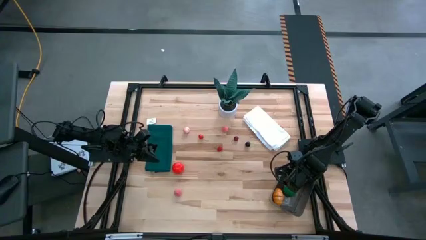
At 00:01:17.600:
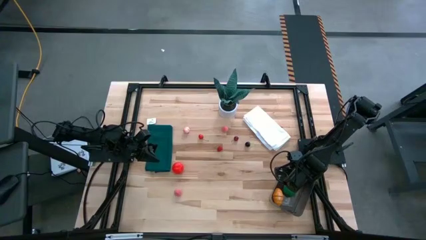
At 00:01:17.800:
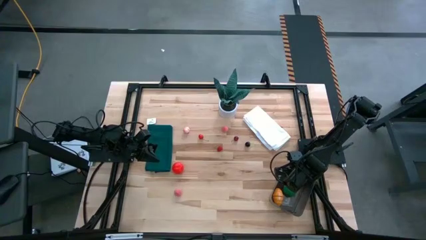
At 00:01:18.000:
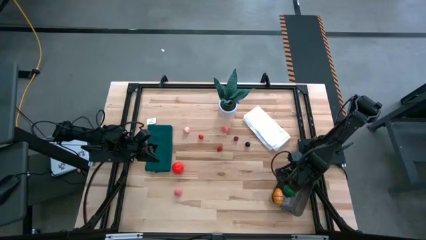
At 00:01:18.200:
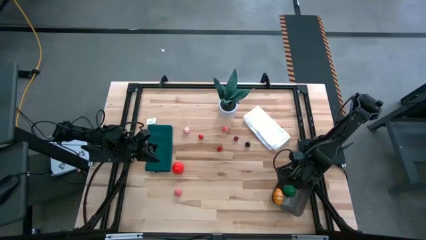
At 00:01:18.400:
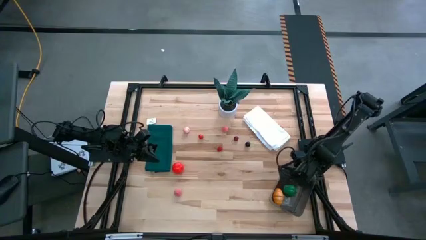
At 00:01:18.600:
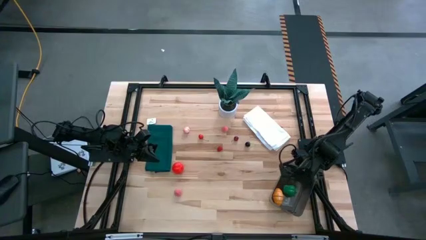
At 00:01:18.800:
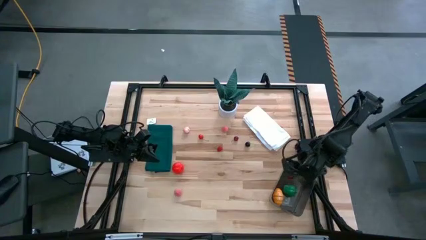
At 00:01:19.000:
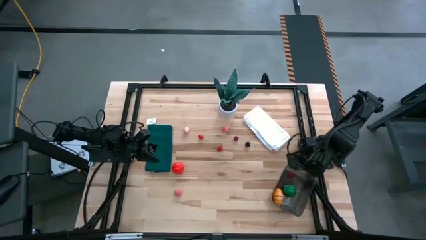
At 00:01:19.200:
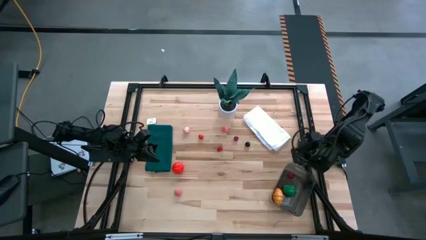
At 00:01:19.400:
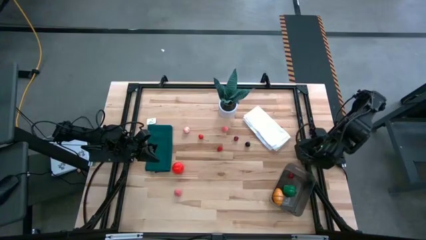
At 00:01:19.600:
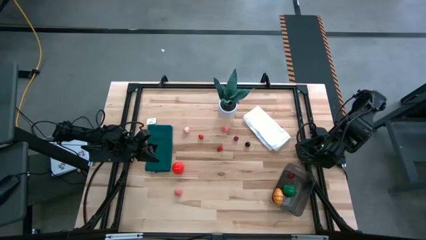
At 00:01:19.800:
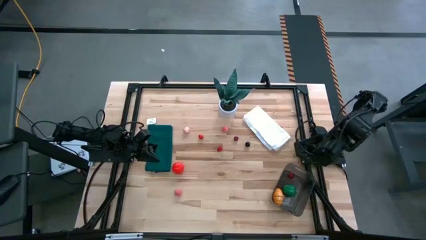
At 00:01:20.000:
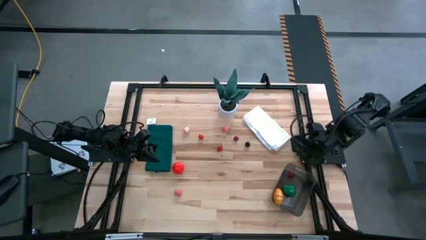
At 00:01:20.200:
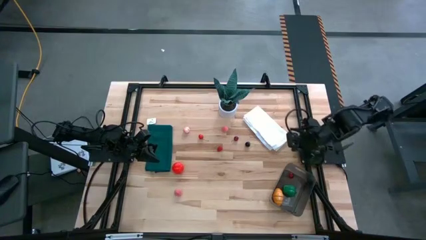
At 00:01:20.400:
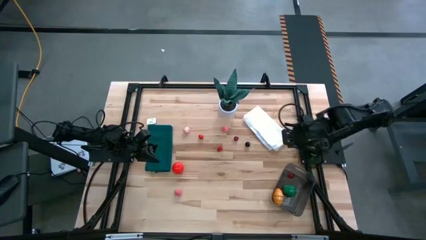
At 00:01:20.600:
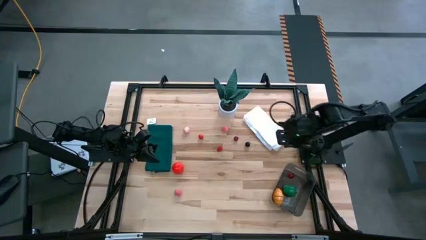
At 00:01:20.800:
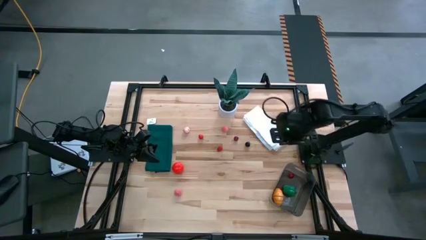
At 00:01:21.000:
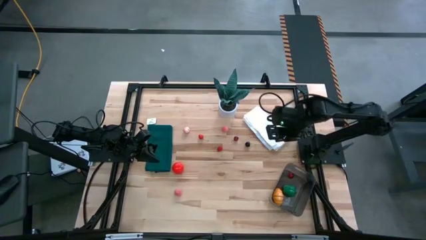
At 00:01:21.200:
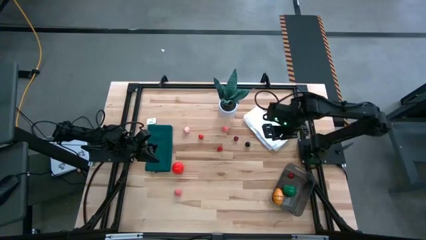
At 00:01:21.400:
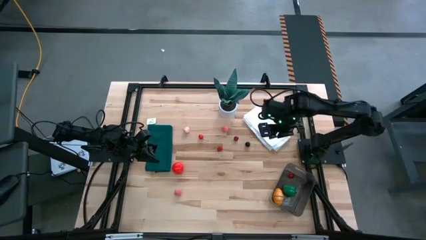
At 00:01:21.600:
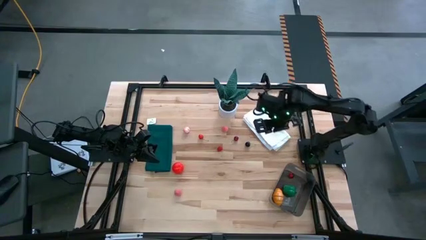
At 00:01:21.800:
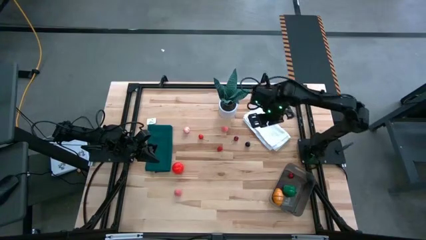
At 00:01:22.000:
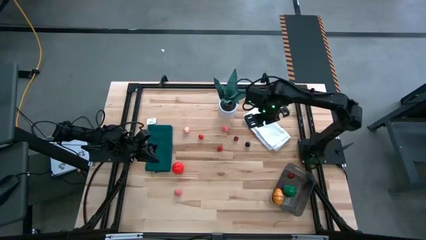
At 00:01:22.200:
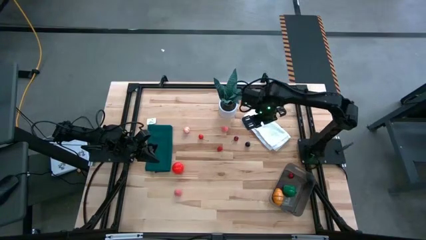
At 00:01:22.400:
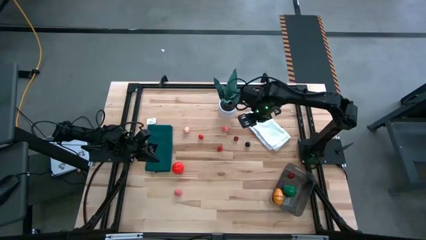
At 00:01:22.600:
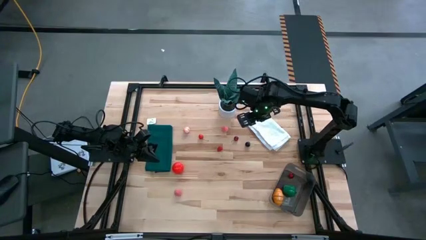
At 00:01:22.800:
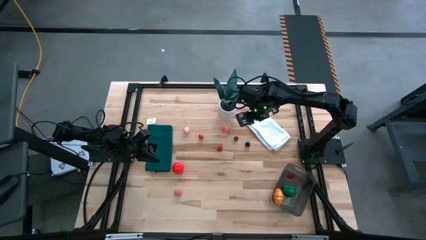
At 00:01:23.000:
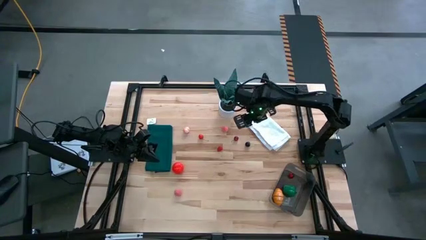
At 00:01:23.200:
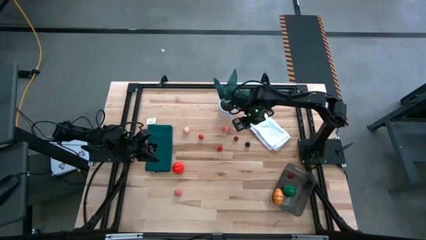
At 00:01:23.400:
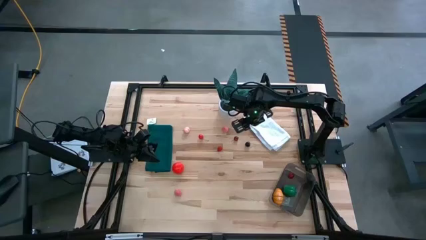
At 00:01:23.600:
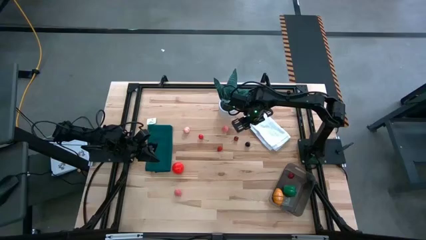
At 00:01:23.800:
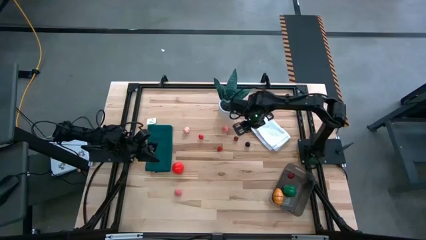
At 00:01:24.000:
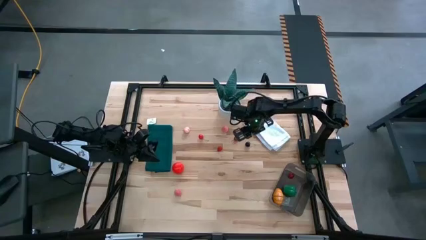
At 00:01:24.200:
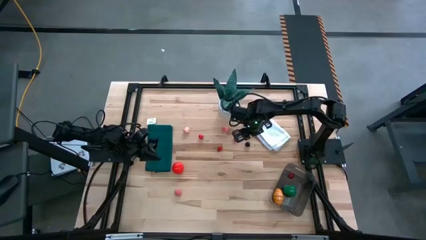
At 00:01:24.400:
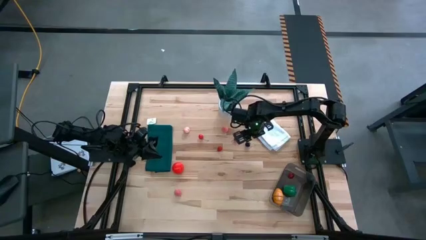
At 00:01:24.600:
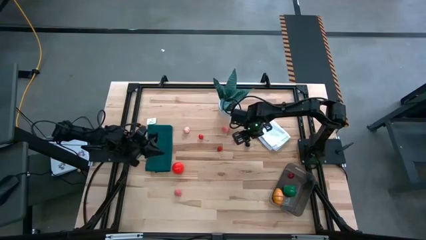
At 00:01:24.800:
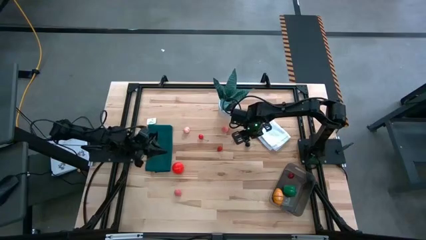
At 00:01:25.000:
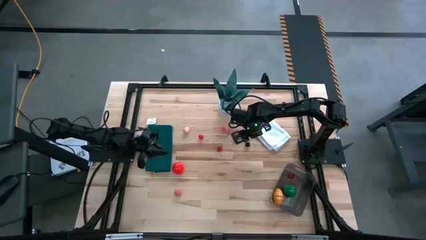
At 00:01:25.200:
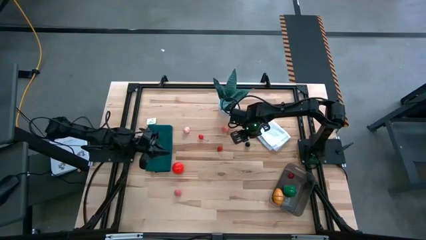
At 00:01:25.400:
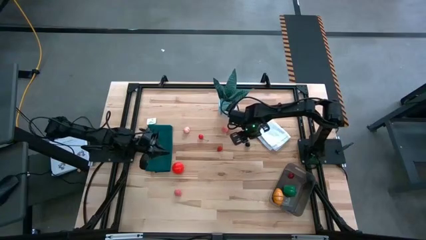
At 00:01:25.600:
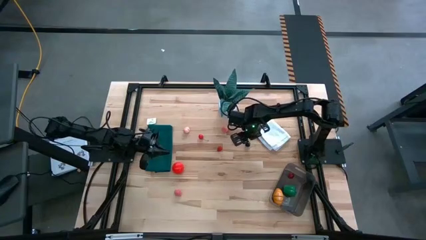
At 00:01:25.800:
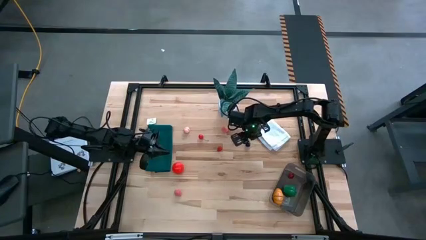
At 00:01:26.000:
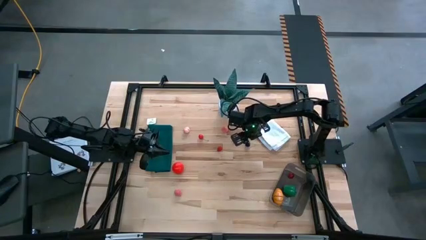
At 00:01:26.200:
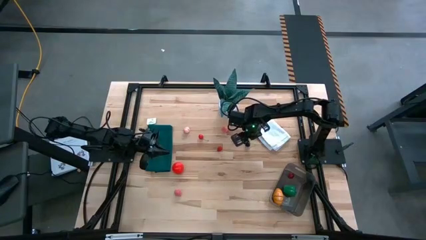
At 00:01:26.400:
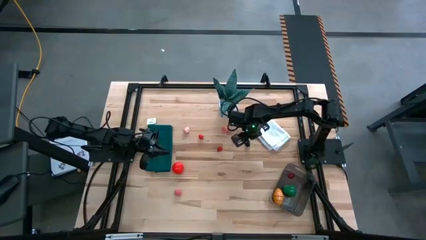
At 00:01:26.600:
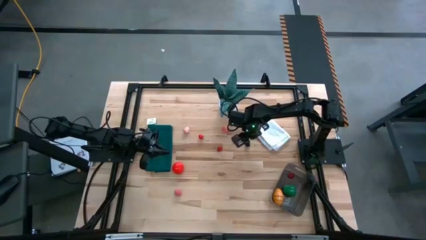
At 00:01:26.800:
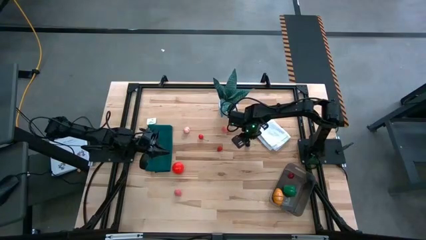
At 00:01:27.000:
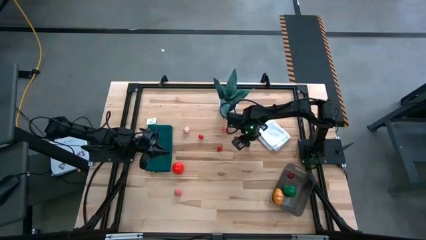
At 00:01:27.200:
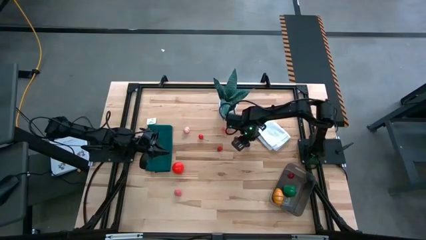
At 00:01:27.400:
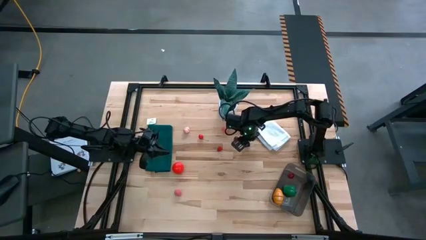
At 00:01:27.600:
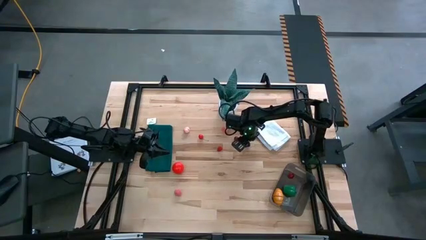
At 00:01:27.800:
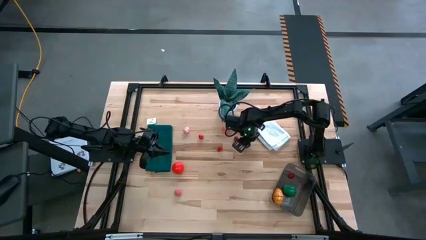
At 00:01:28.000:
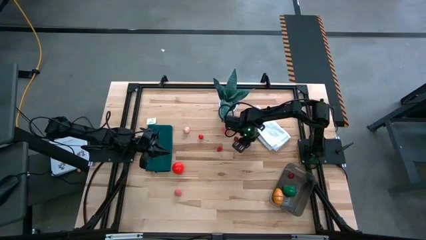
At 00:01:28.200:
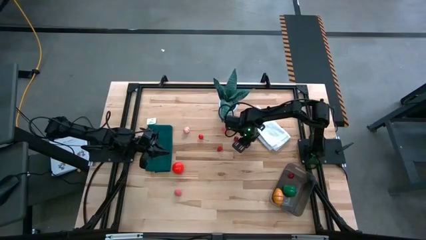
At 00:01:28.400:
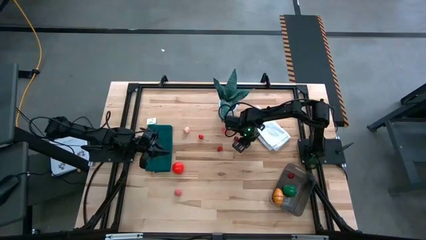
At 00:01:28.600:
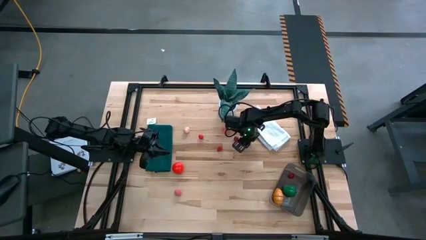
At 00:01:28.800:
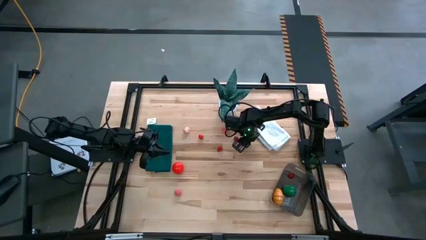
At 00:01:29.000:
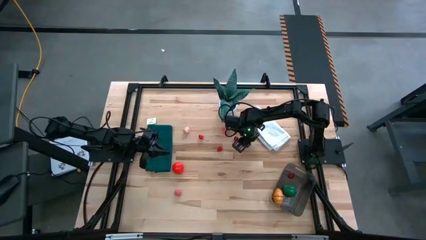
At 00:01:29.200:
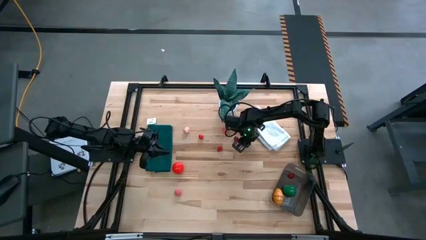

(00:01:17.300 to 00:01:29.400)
Task: Pick and placing Produce into tupperware
Put the black cherry into the black bin

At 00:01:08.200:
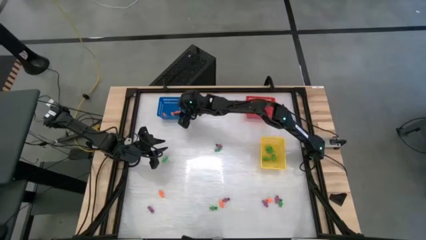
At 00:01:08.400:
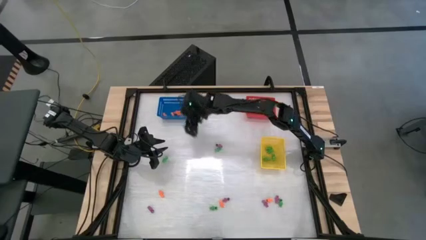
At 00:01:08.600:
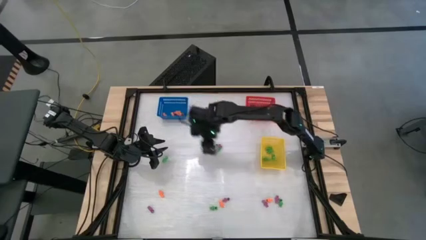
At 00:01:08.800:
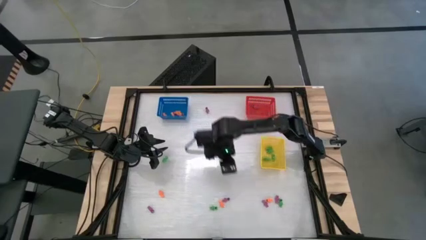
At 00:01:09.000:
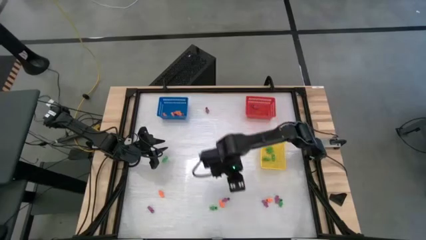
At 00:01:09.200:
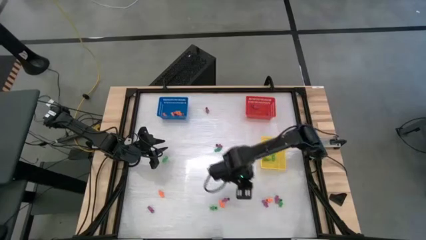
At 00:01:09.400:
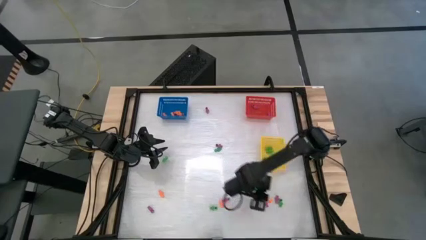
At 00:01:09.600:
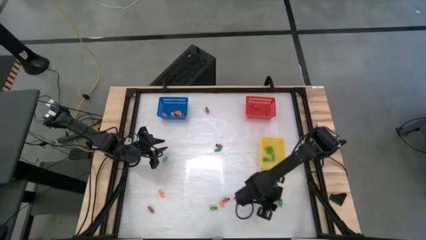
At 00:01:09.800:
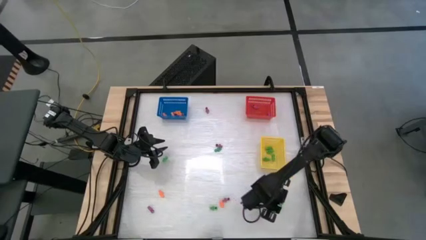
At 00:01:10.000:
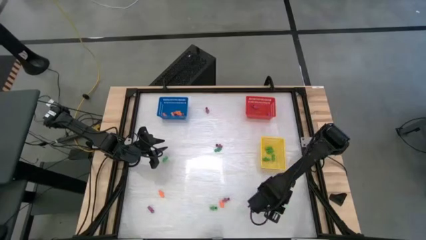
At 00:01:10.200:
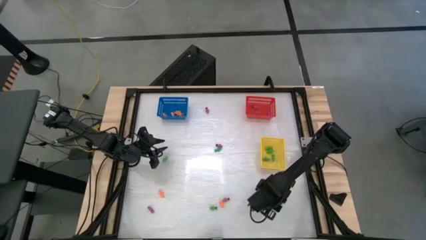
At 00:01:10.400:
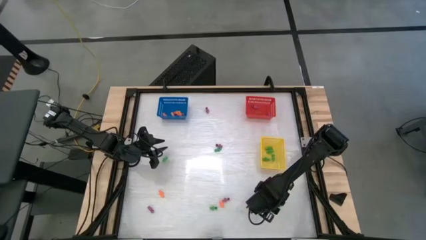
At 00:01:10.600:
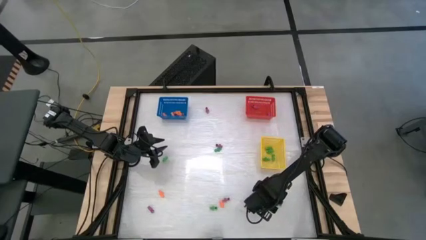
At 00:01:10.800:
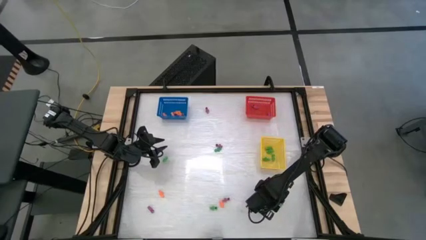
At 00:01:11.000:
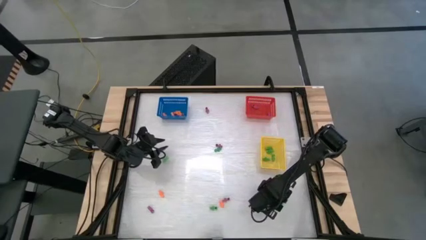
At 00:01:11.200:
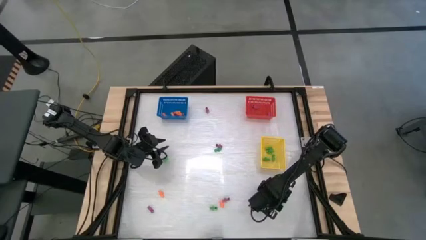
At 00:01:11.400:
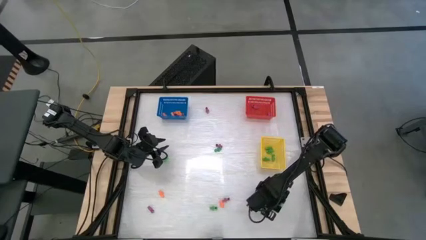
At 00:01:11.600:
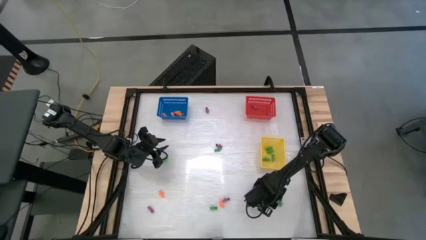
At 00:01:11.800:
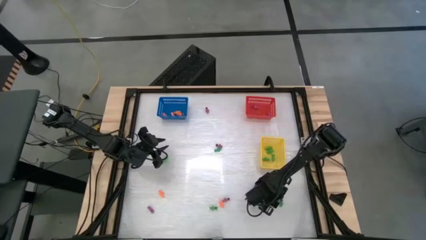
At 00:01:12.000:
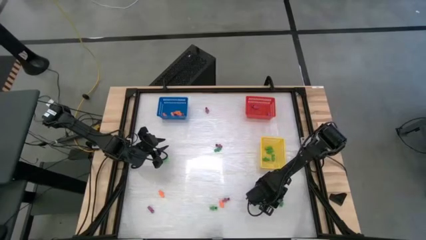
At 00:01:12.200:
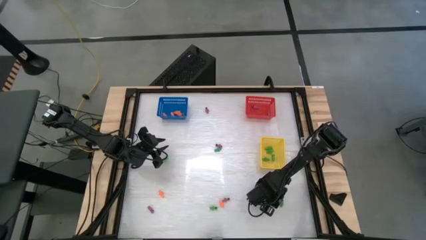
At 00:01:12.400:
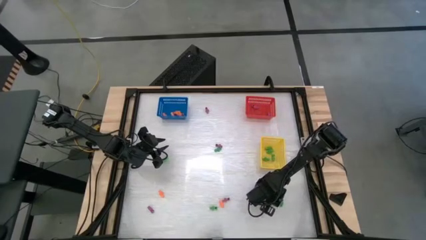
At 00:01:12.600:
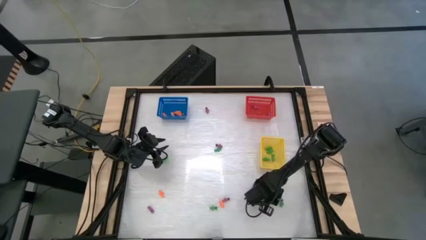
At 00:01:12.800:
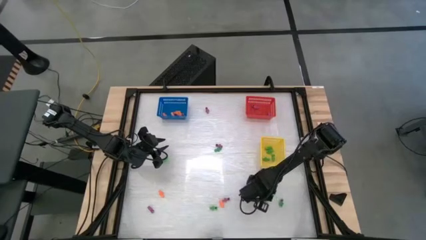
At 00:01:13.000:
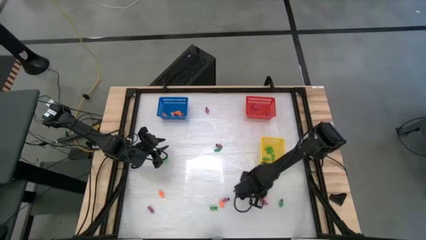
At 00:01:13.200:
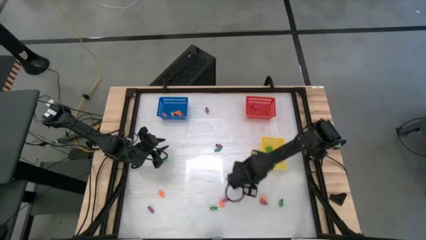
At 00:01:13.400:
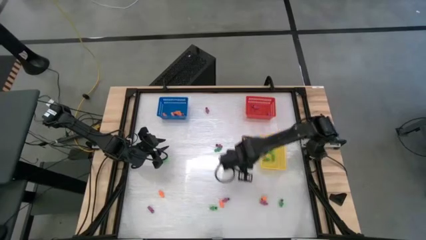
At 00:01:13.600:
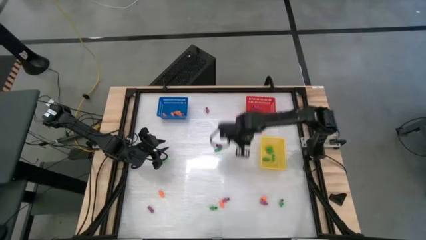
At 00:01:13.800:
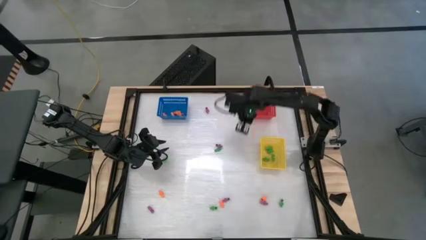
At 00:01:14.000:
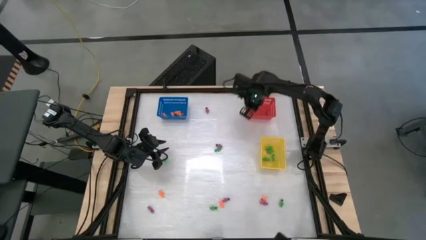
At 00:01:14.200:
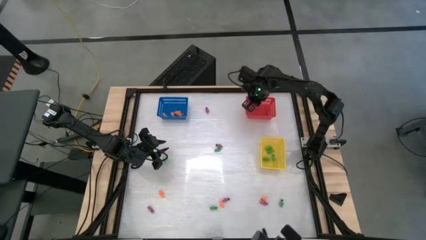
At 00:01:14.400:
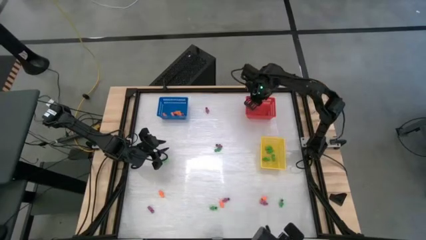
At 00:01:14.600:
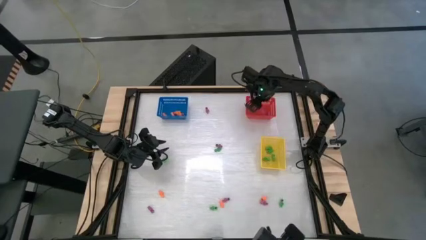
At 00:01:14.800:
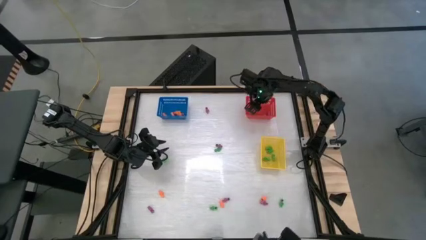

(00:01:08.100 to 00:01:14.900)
Task: Sort Halloween decoration
Put the purple skeleton toy into the red bin
